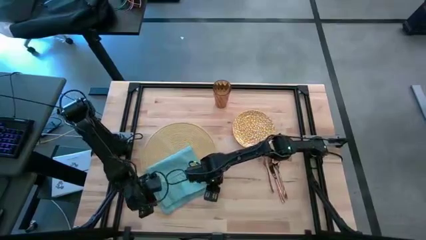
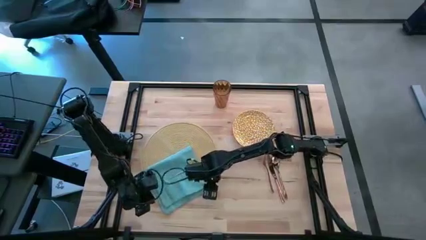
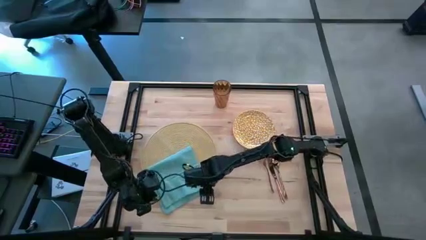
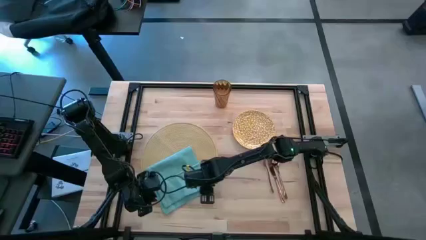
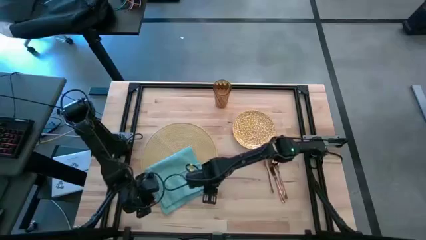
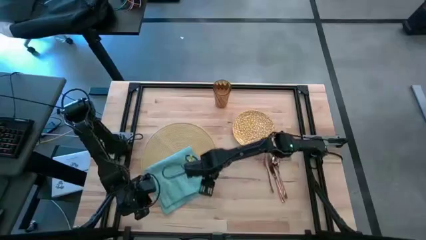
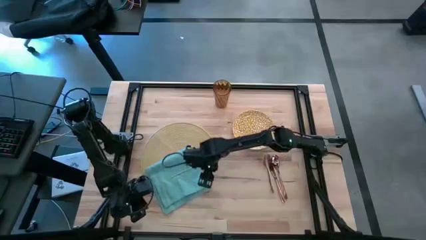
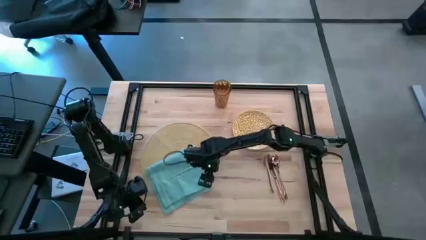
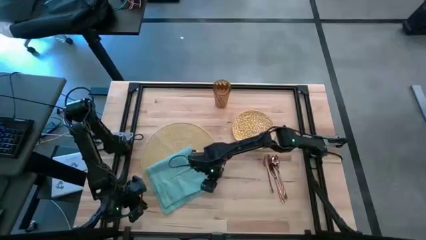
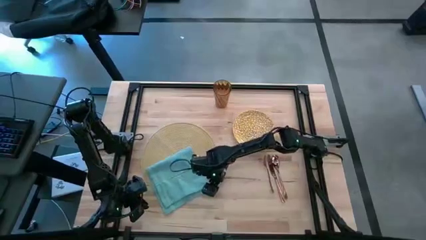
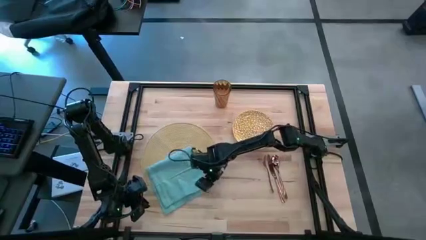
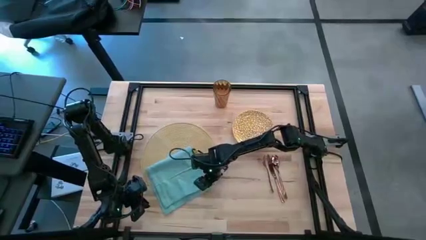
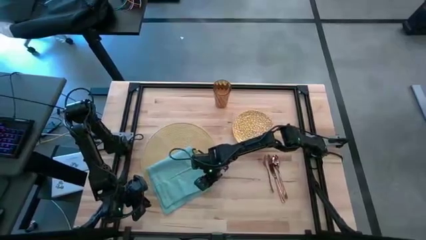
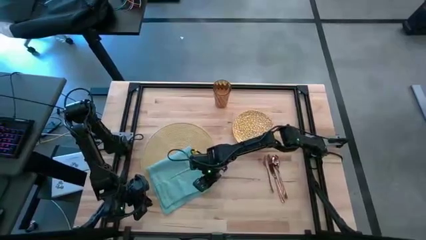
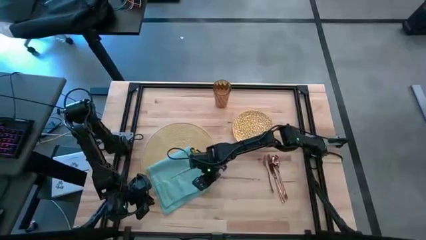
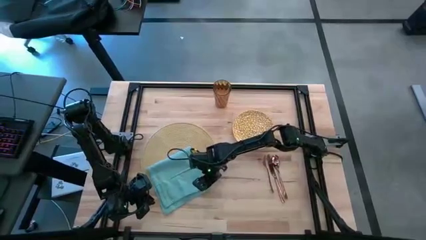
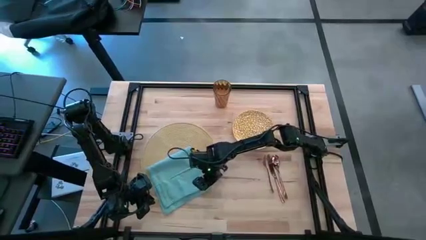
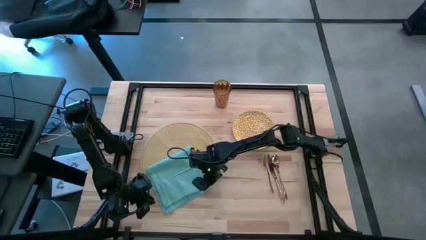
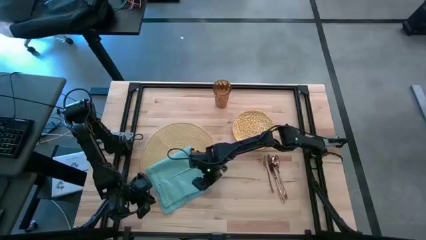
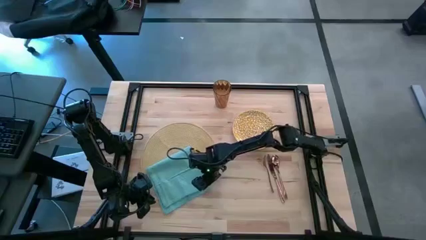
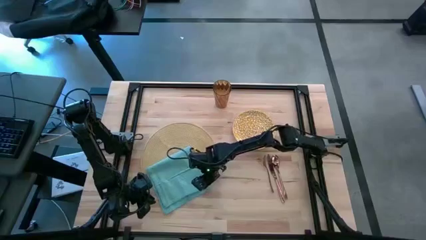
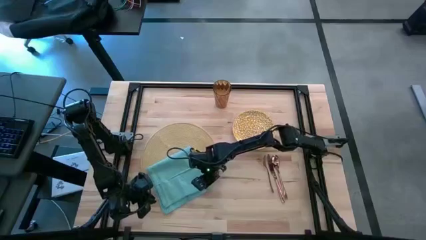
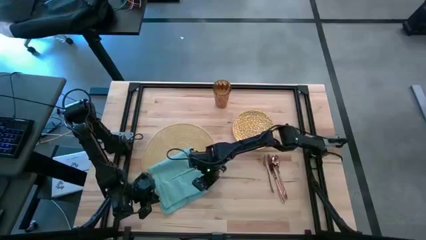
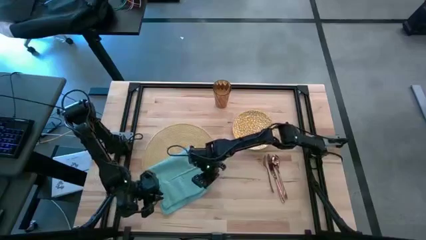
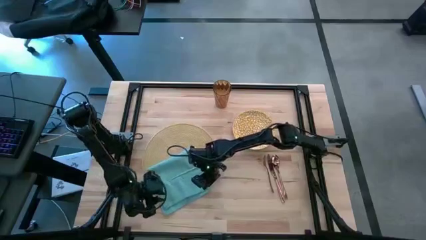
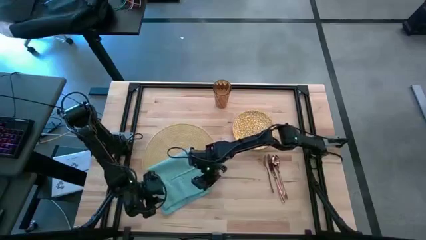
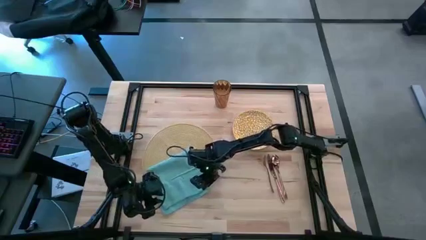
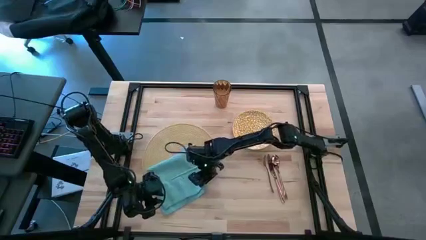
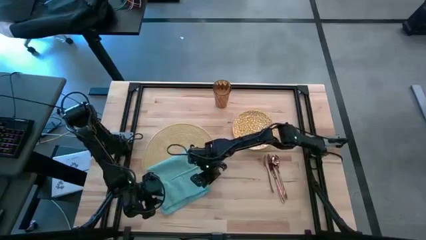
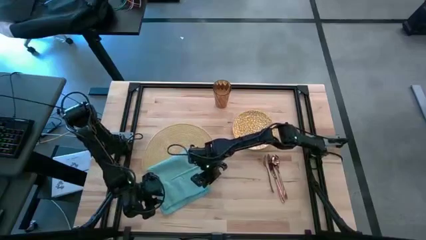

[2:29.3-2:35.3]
Task: Set table place
Fold the blue table napkin

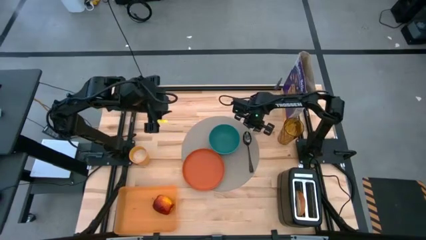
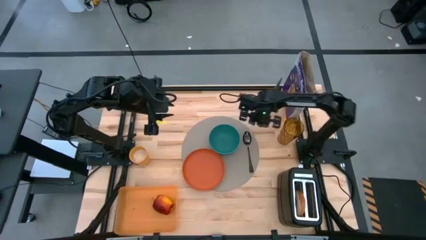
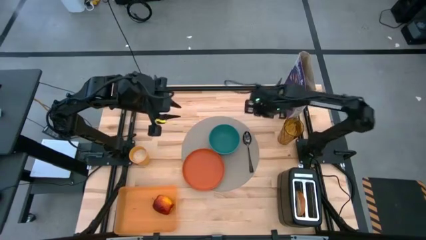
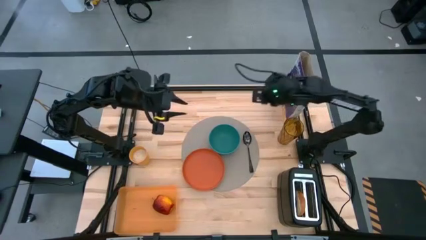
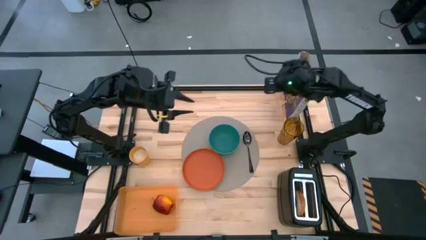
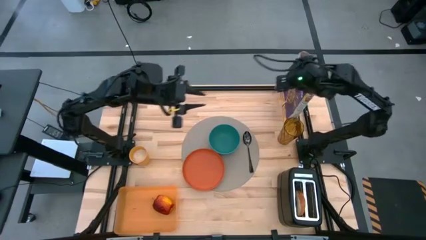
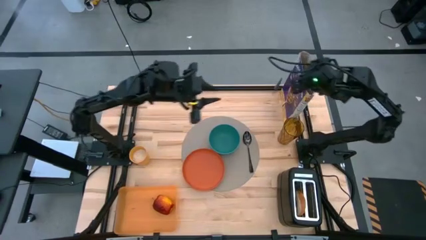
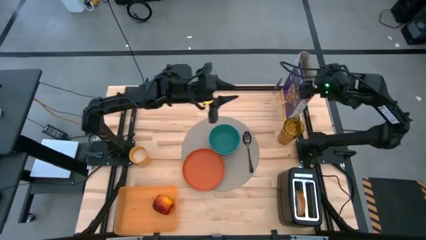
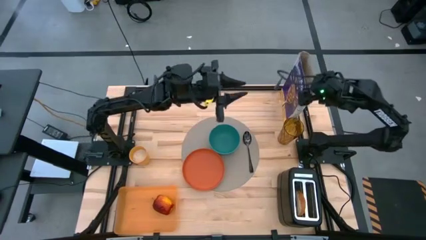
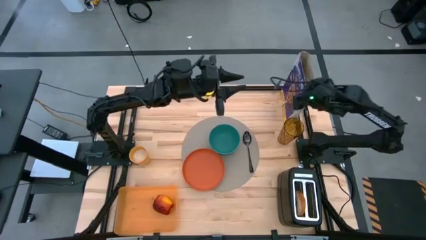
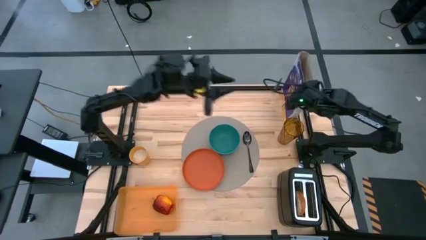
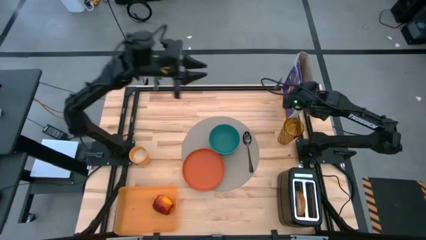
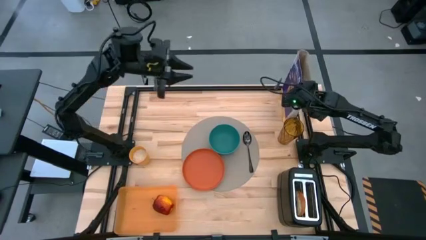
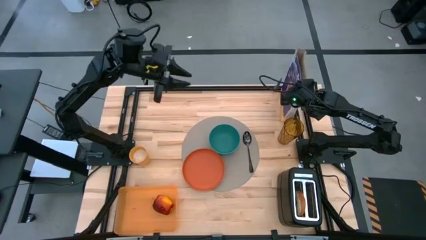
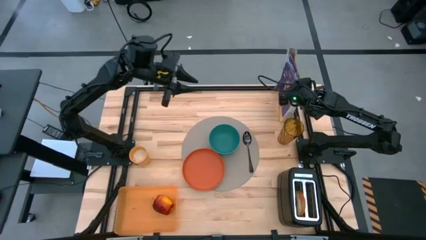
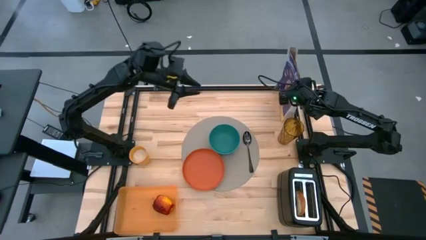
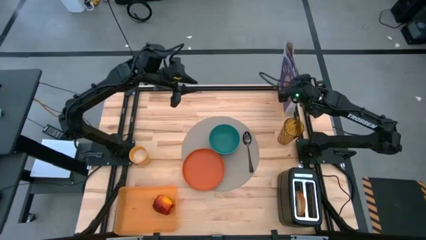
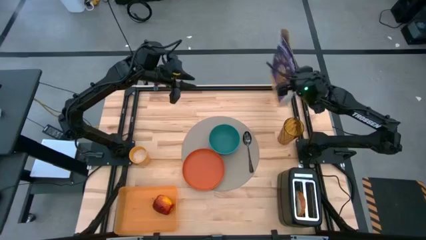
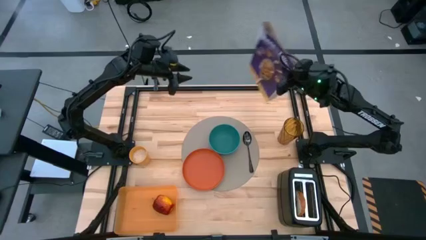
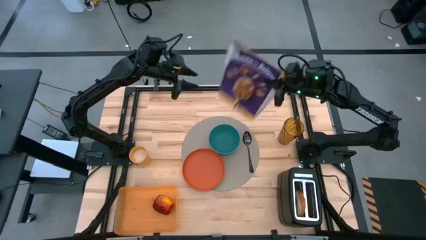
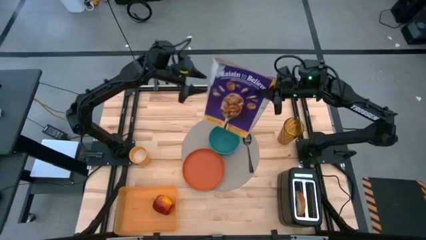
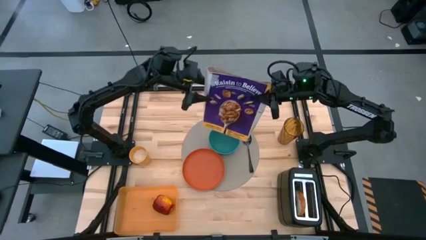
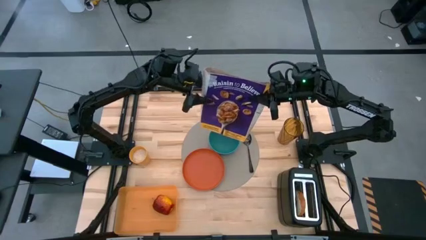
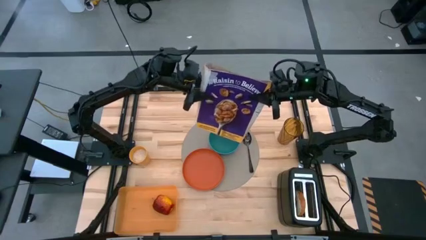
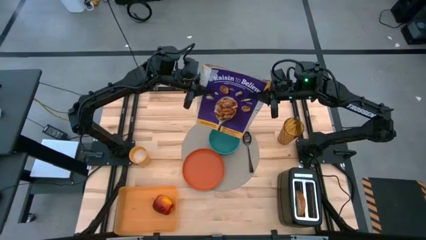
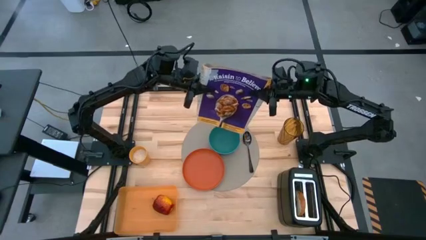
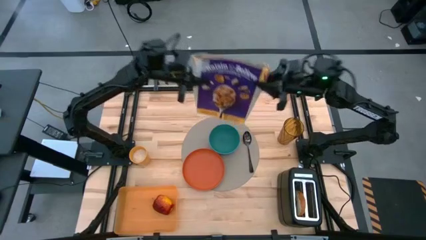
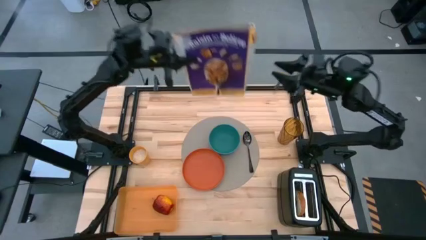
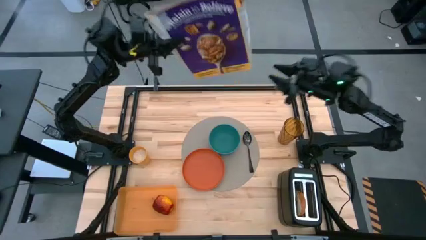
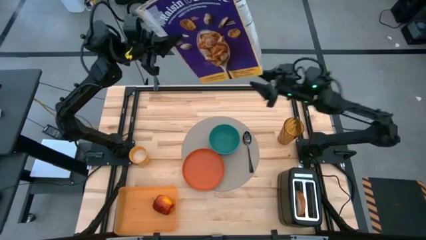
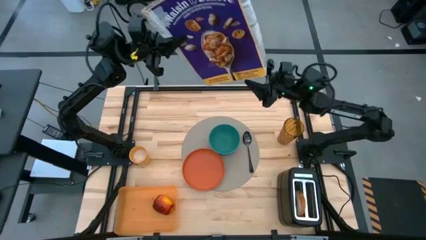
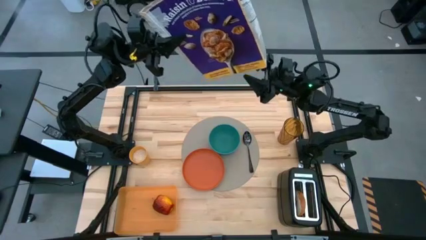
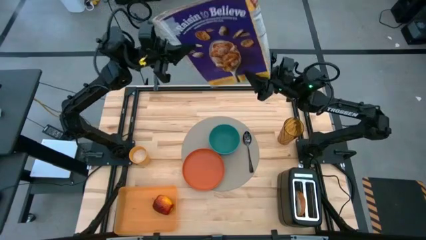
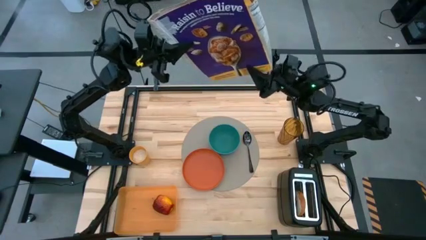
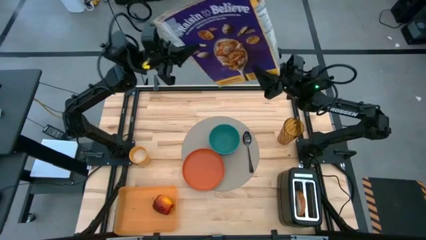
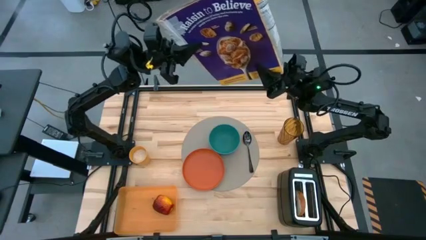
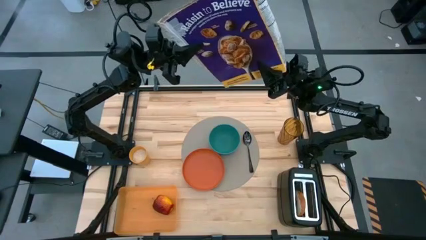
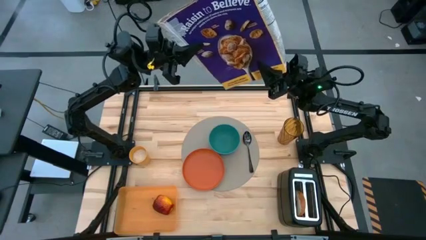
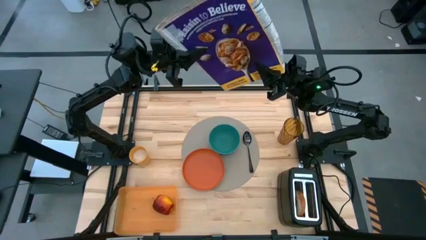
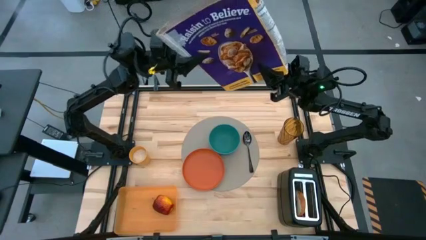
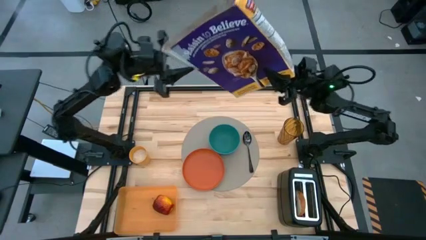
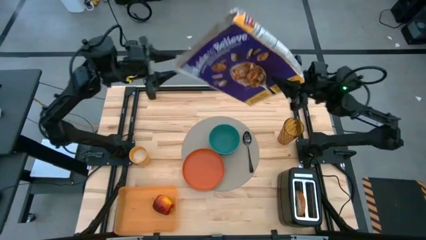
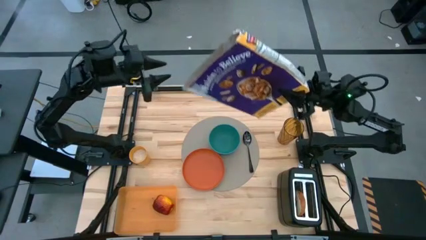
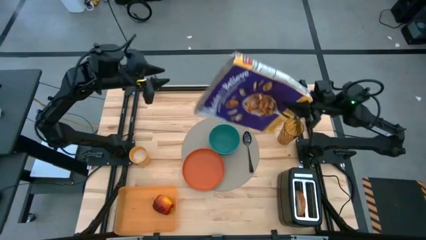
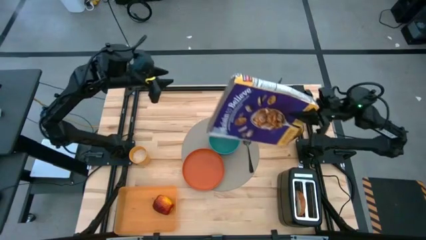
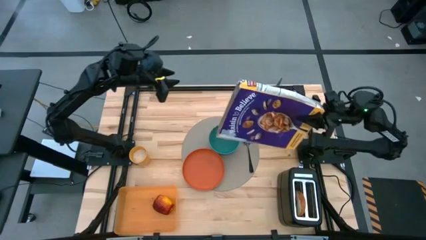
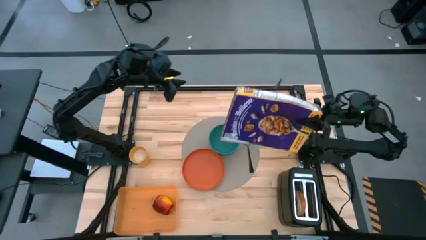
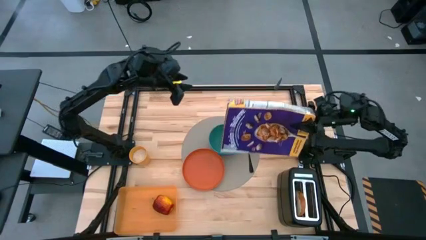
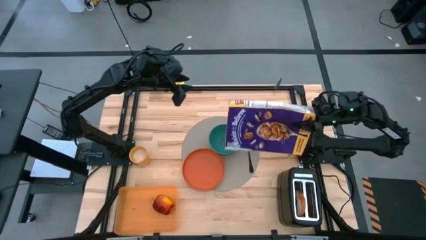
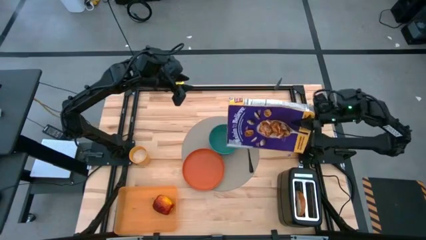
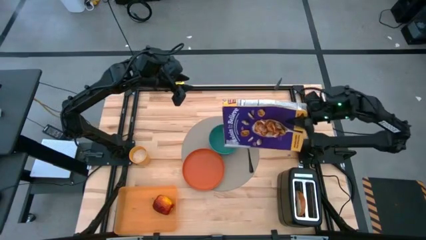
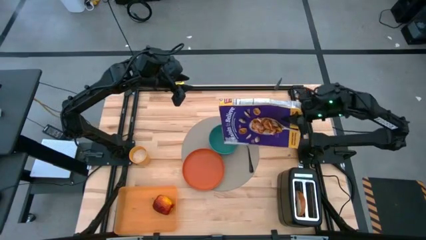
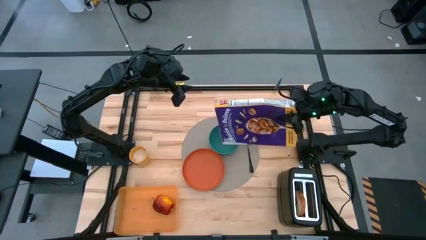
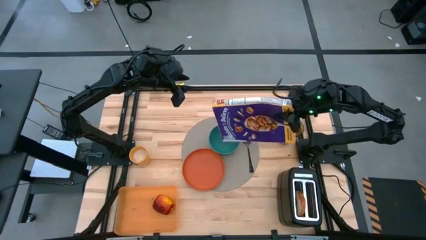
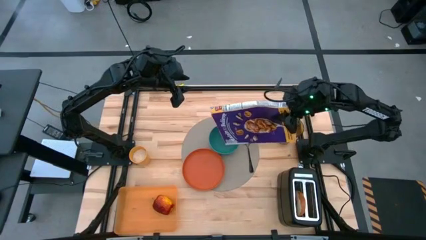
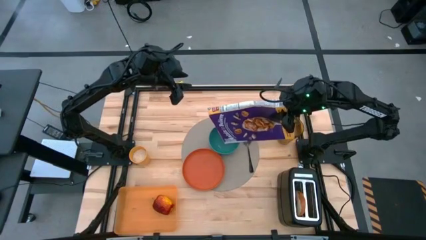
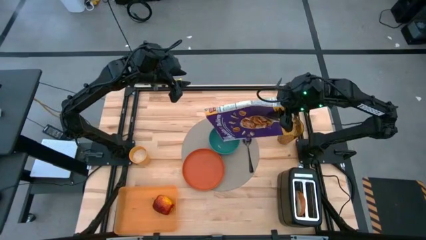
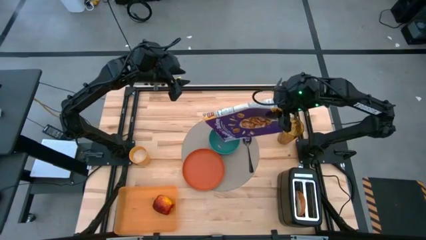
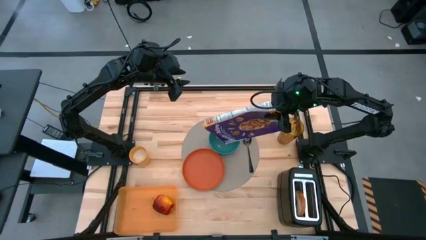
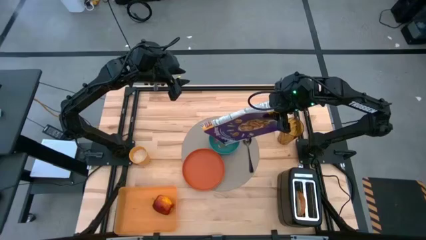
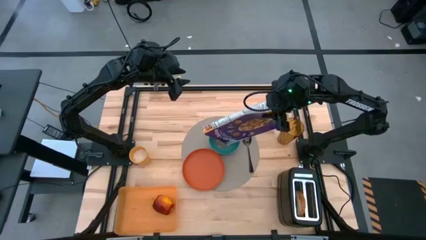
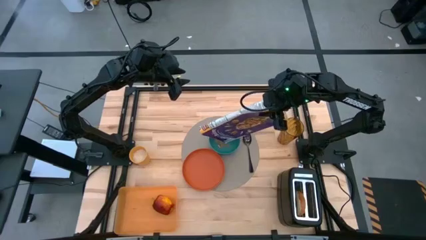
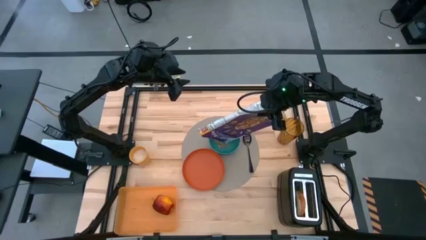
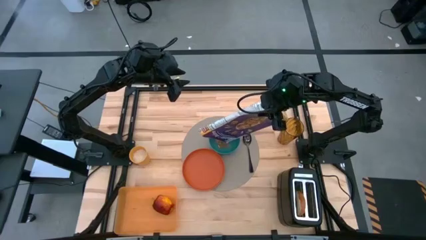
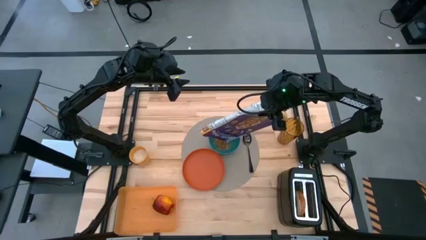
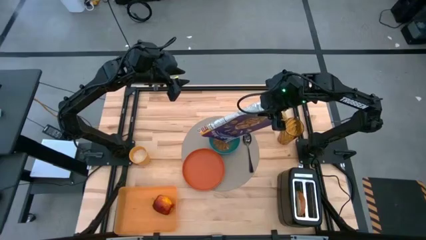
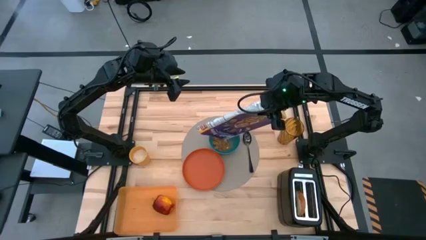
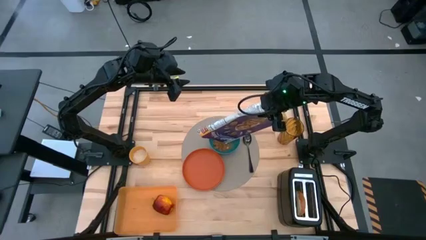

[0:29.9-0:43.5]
Task: Arrange a breakfast setting
Pour the cereal from the cereal box into the blue bowl
